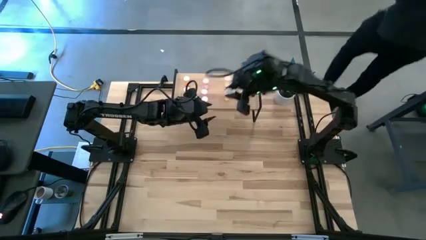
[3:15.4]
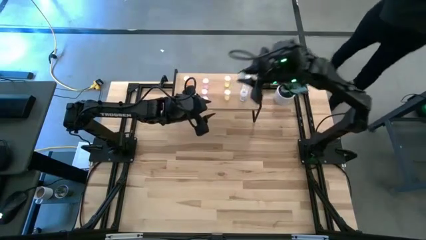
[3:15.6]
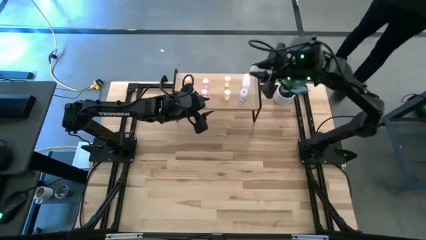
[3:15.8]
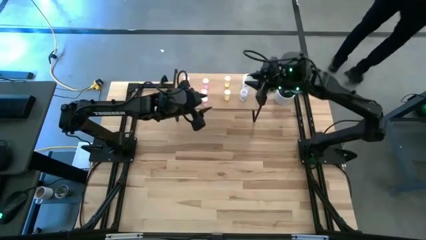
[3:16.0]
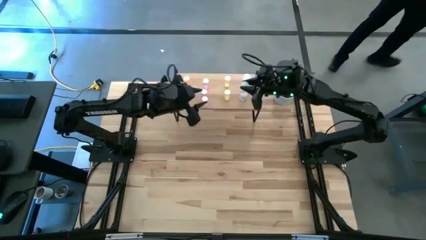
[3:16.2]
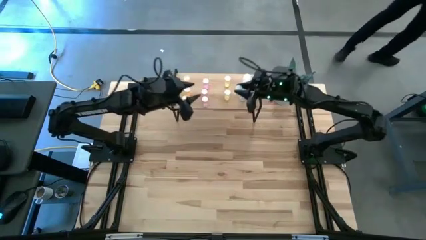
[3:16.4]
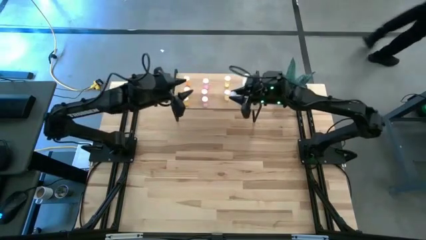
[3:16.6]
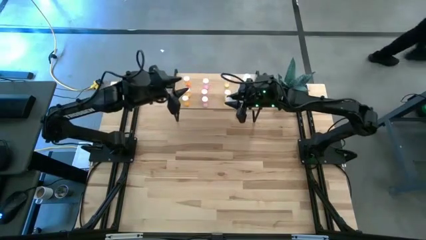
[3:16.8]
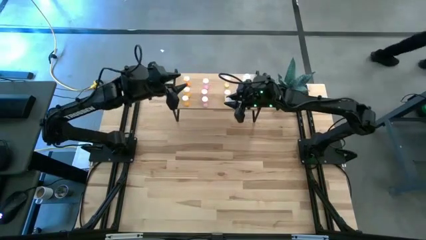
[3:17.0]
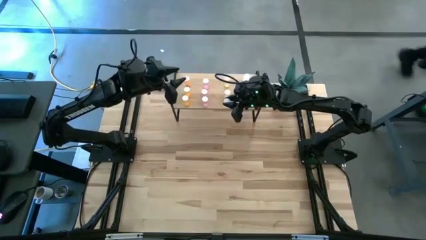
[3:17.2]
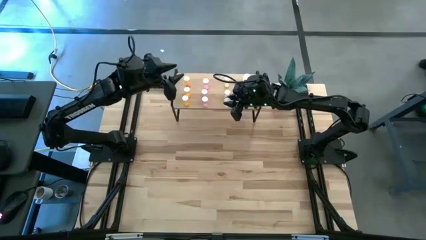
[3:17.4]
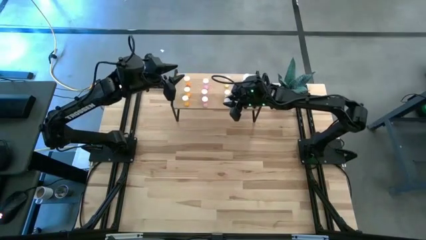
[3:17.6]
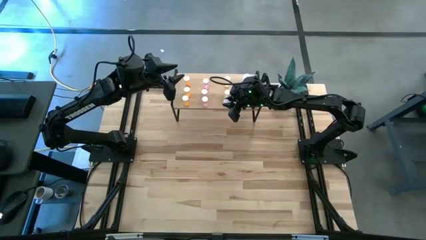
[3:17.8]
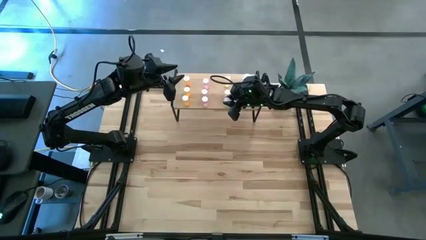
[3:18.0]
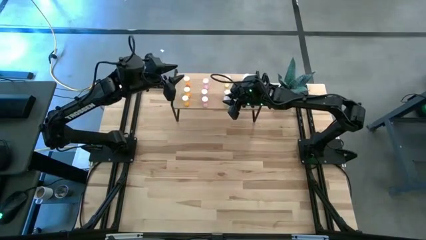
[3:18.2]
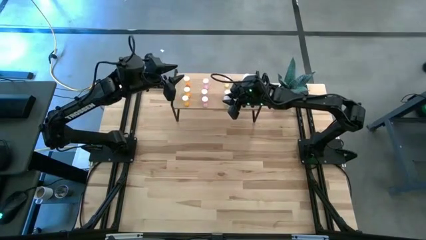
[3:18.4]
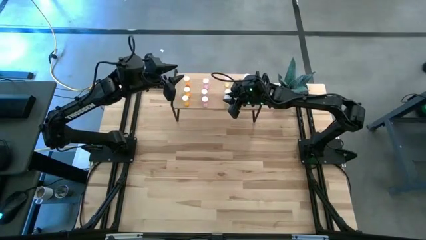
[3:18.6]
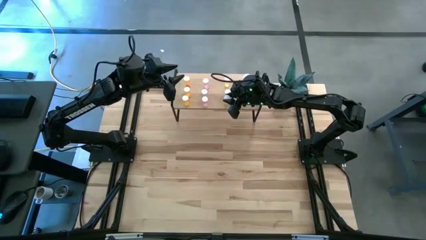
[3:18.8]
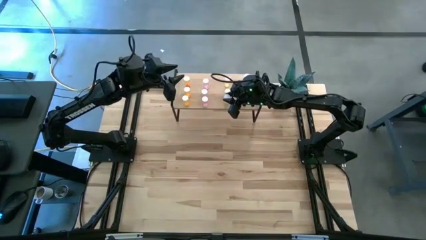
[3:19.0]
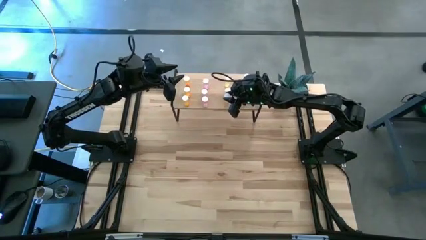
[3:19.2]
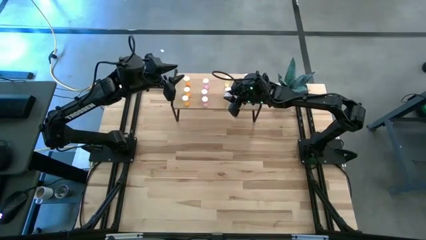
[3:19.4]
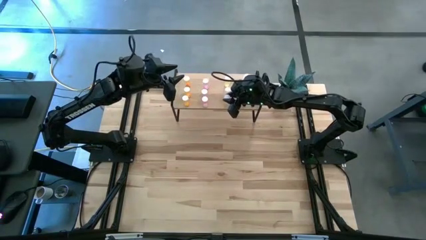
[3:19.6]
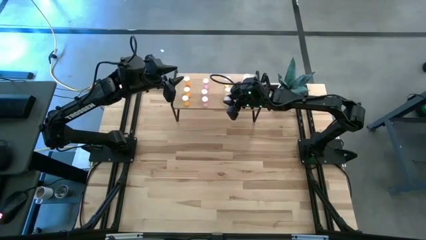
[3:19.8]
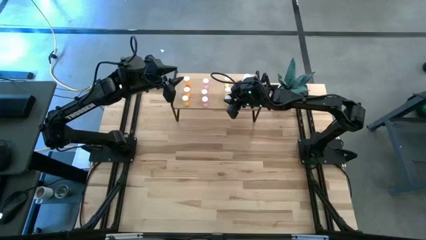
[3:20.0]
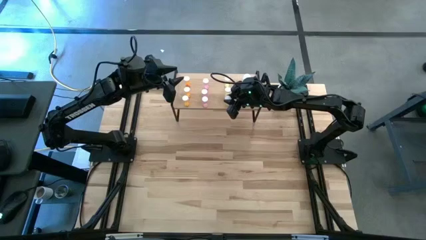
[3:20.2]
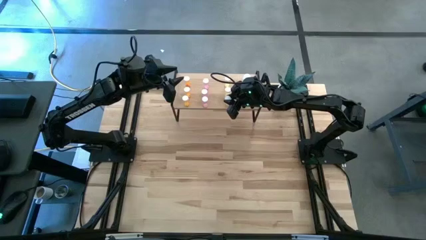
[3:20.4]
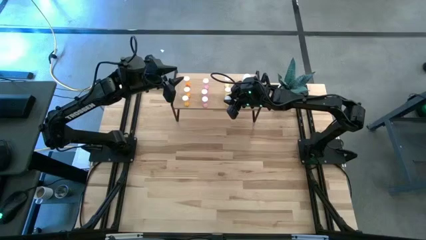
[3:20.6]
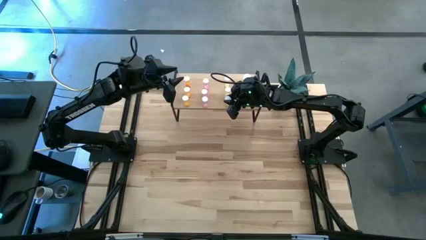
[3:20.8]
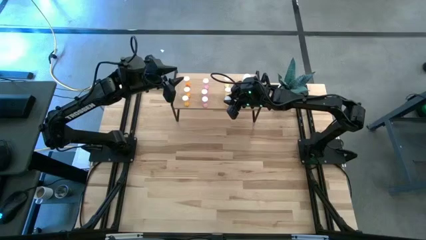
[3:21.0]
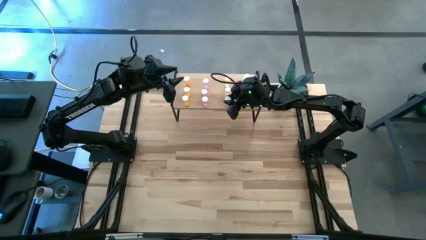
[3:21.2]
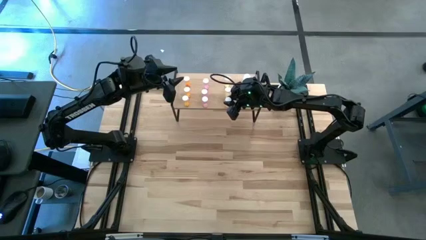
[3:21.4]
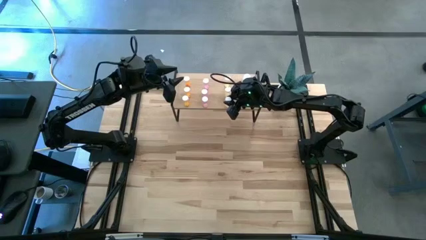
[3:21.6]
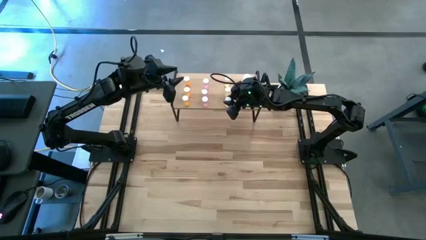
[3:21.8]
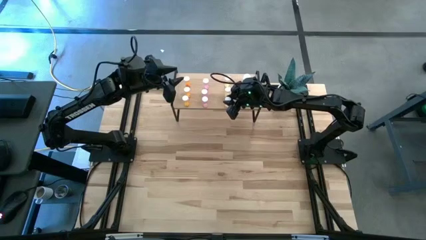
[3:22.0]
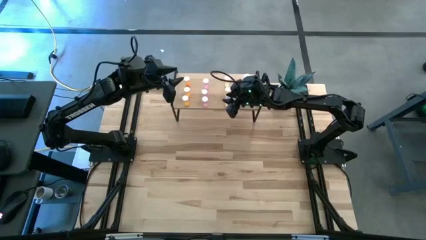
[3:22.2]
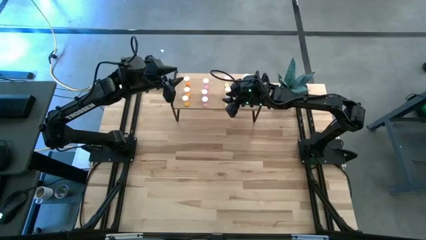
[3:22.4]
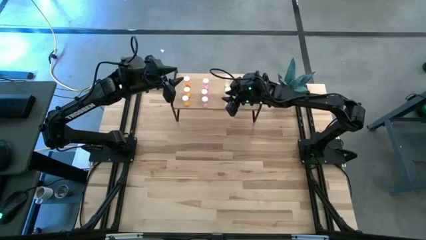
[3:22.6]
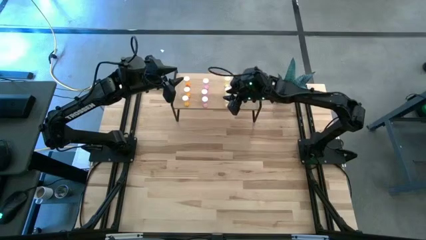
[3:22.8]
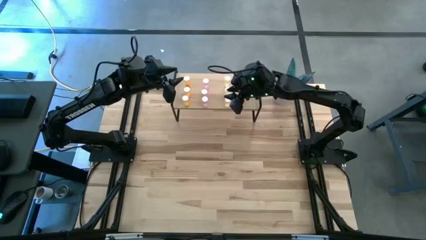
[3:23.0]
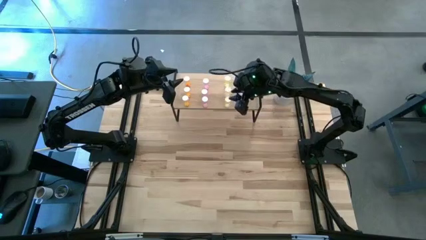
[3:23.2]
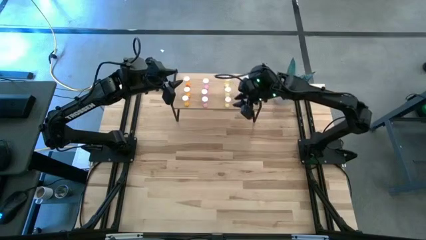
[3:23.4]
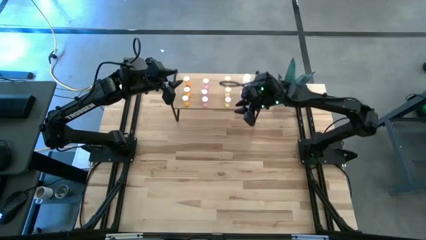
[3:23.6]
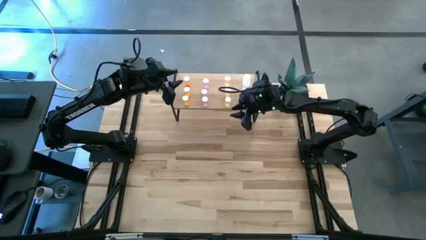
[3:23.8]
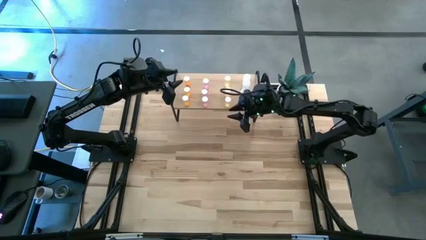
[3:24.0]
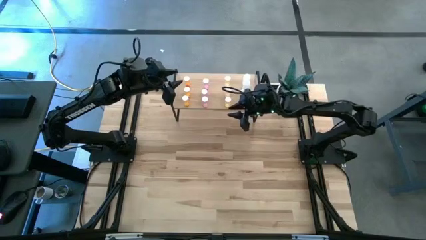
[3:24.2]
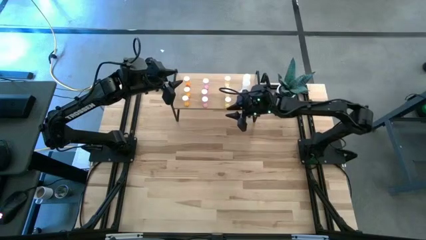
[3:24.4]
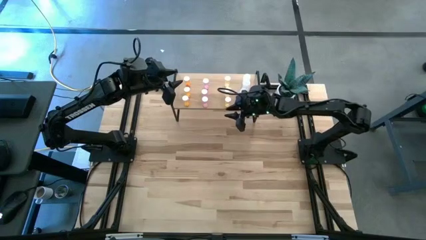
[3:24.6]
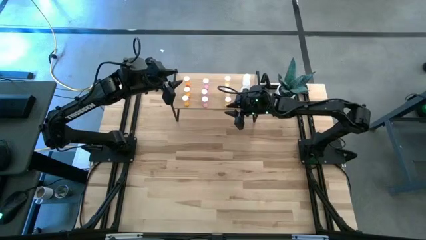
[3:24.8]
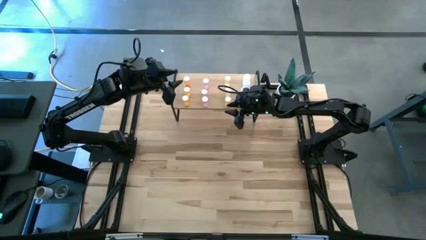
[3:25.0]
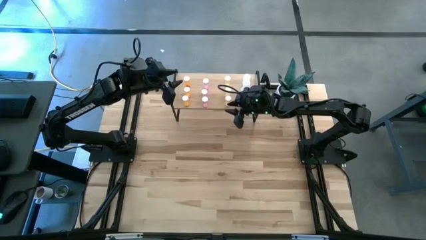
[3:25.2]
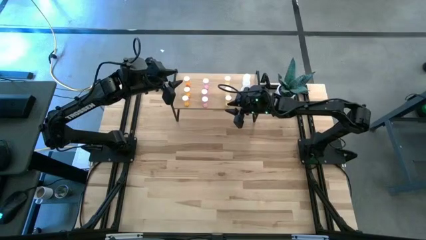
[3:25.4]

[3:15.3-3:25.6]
Task: Pick and place medicine bottles onto shelf by color
Put the yellow pill bottle on the shelf aligned with the other yellow pill bottles

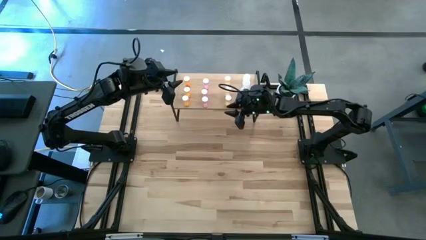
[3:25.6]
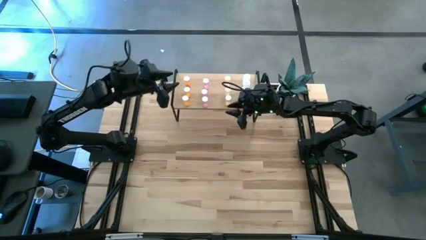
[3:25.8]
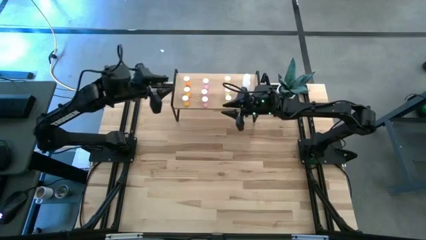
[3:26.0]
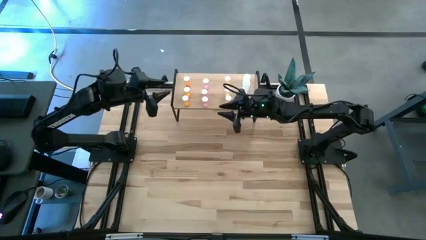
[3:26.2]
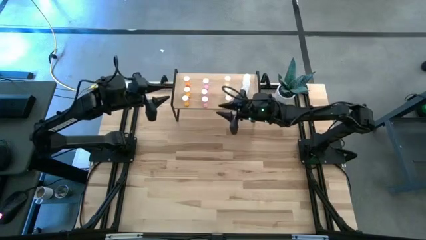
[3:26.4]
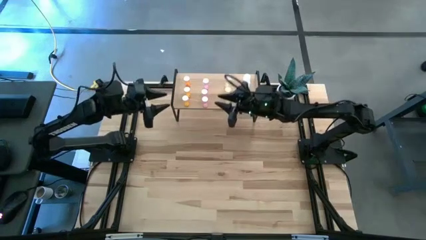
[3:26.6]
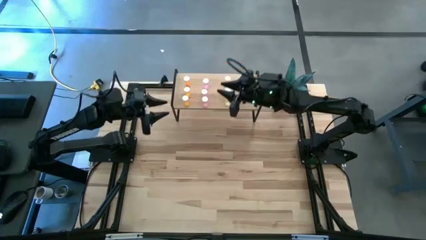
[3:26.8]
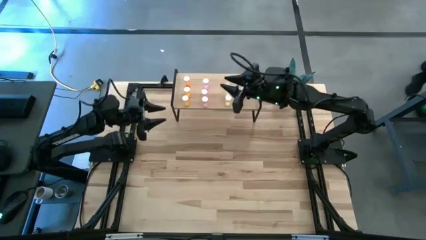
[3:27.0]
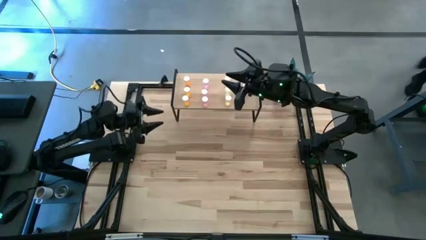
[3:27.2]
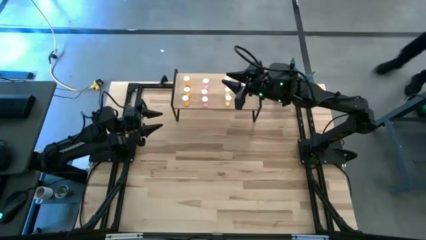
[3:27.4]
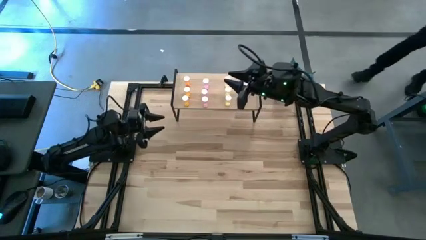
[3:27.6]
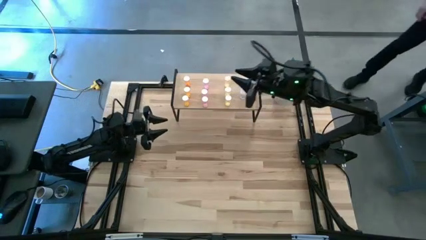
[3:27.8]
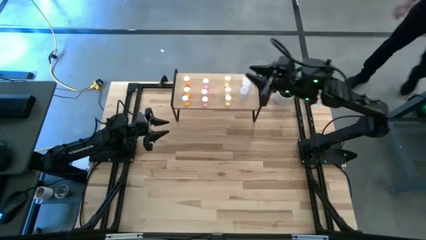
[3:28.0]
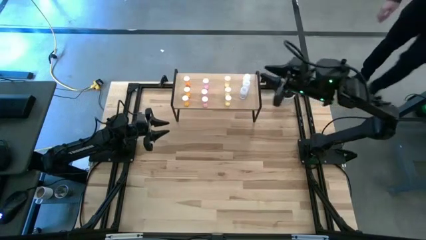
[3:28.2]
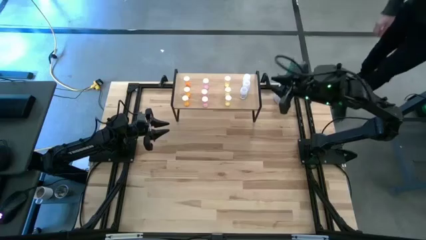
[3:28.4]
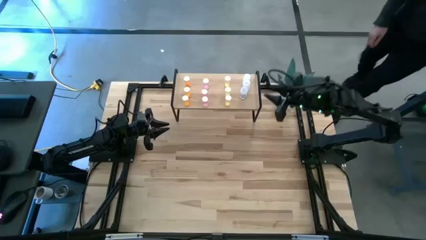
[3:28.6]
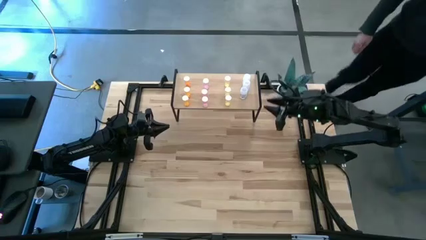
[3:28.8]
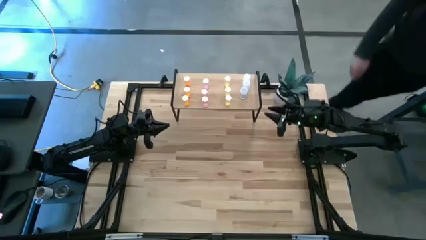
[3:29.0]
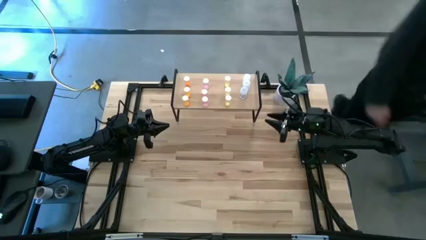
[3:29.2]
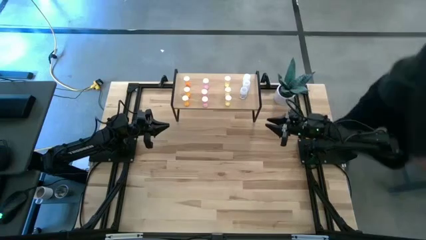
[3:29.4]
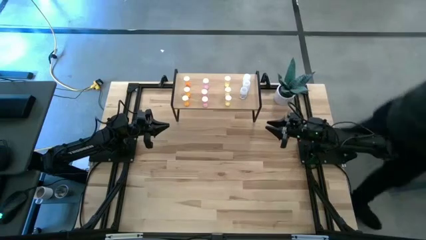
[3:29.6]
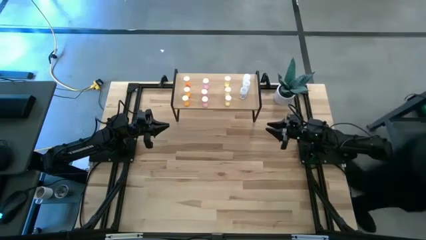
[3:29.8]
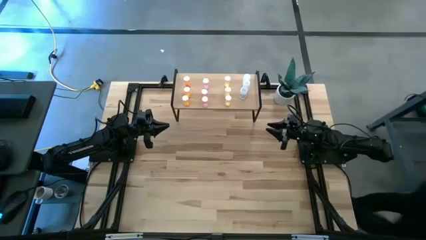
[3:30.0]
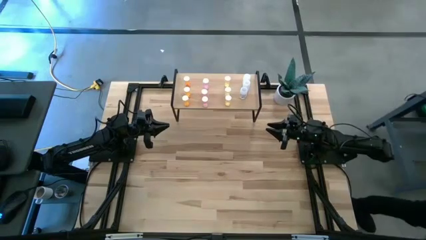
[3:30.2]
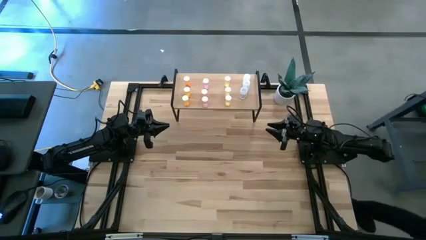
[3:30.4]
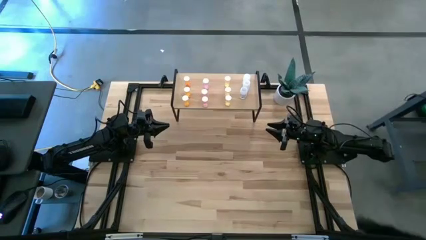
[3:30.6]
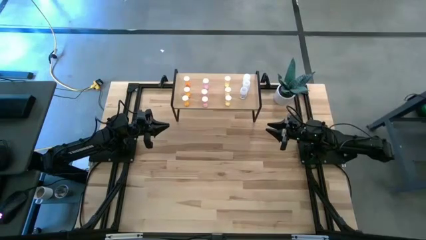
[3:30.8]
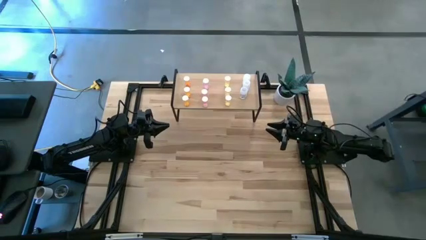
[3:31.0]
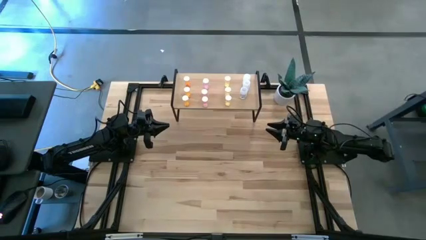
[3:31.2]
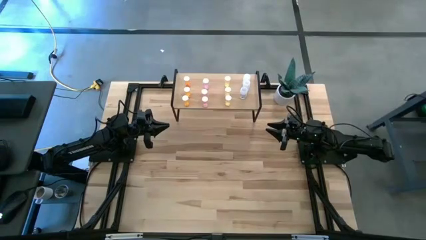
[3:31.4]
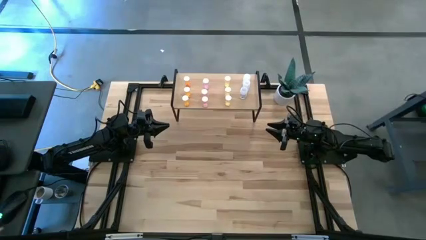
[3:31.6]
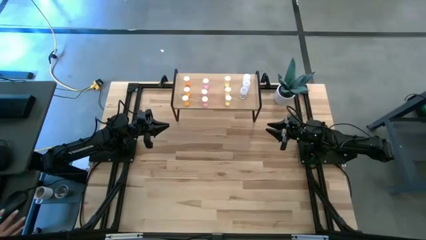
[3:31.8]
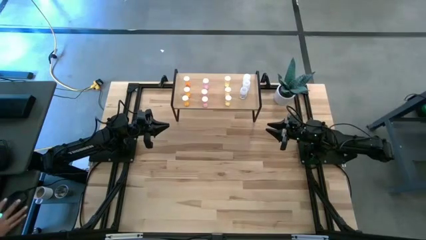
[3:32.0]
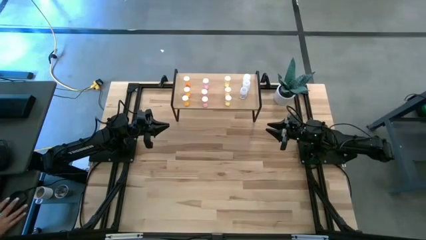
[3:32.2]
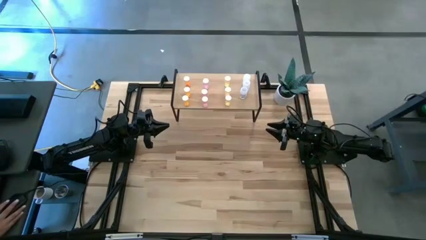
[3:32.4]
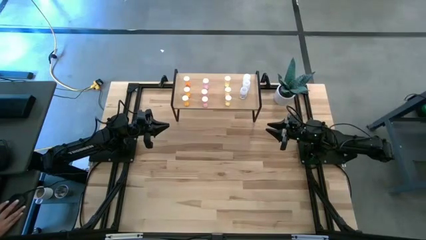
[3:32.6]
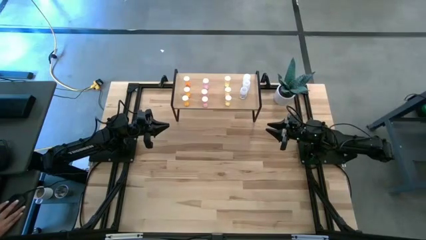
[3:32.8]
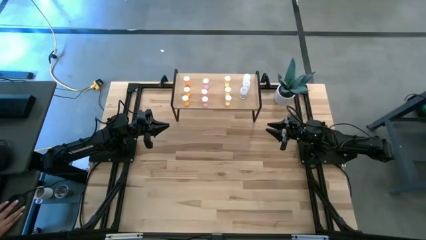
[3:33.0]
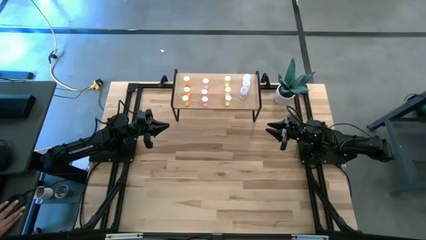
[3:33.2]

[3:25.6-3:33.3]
Return to Home Position
